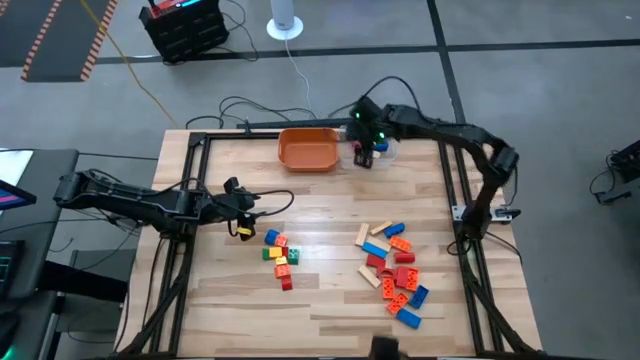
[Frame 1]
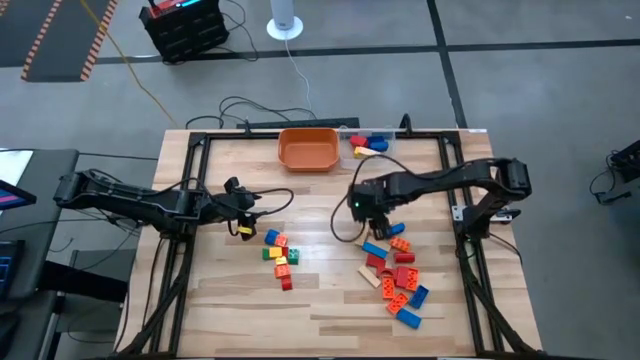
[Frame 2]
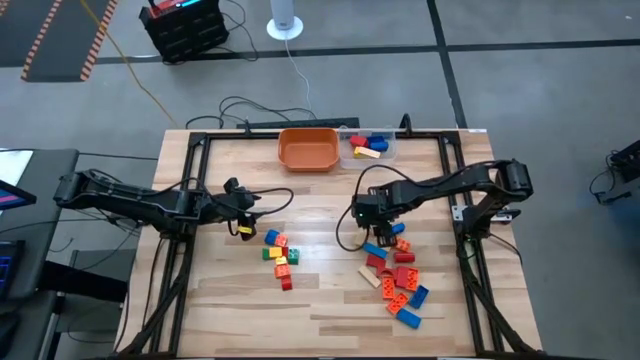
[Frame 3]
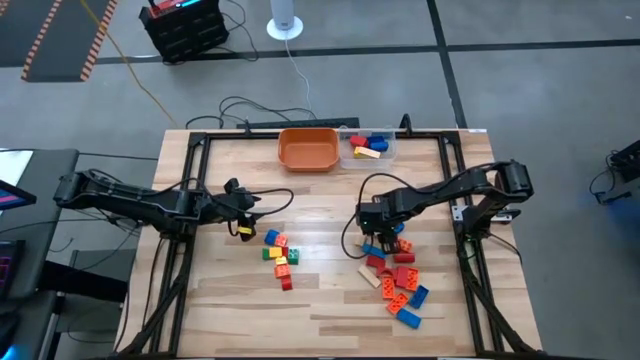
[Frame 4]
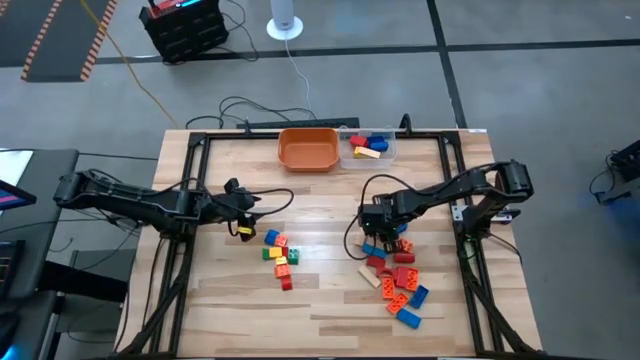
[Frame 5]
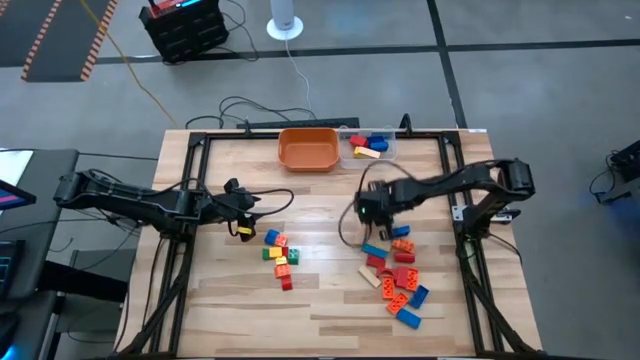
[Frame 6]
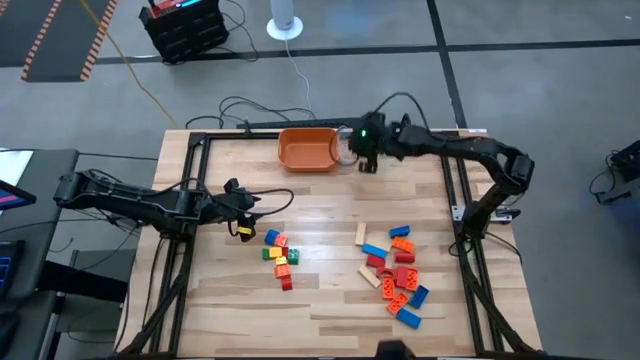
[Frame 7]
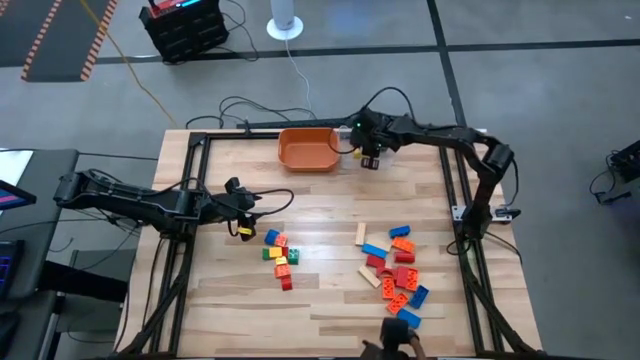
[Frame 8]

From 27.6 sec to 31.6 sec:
Task: Sort blocks by size
Put the middle right wooden block into the transparent bin

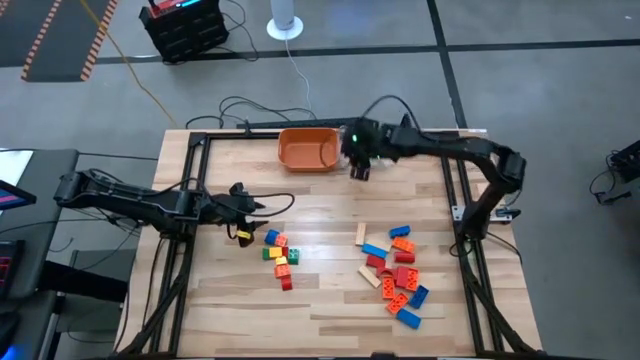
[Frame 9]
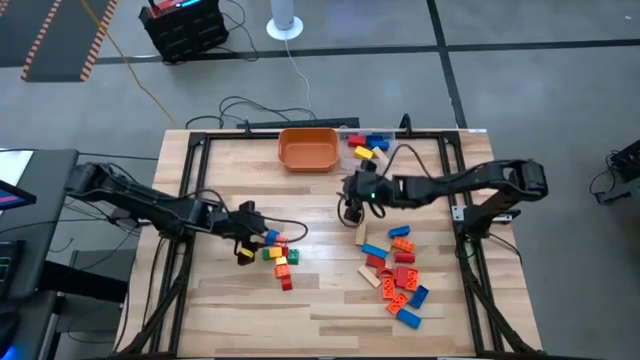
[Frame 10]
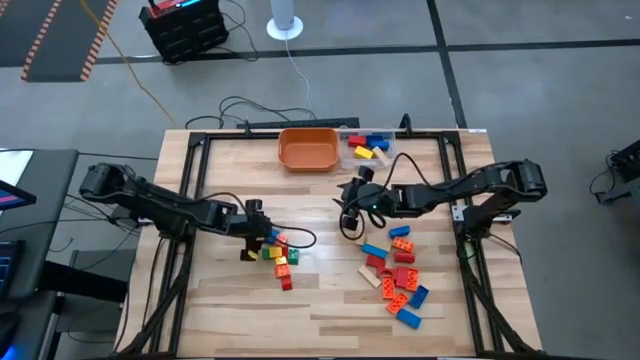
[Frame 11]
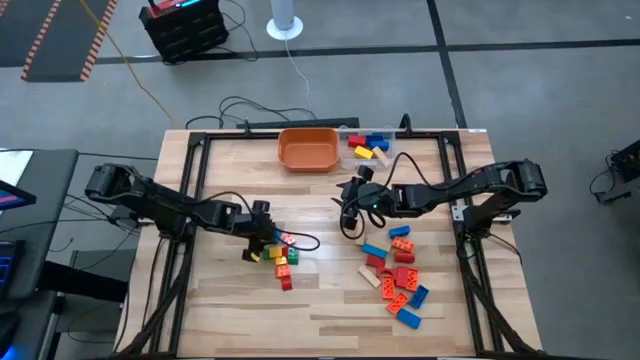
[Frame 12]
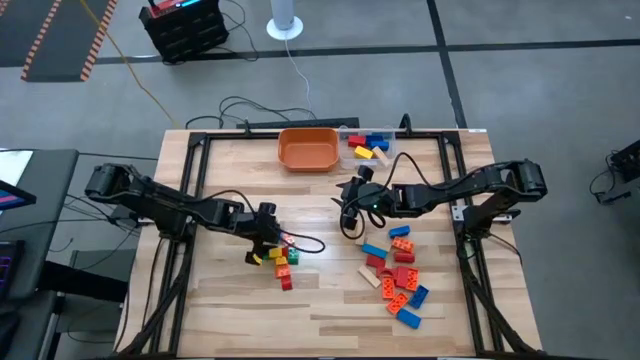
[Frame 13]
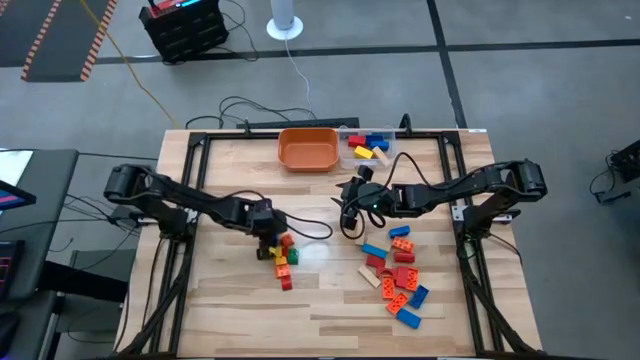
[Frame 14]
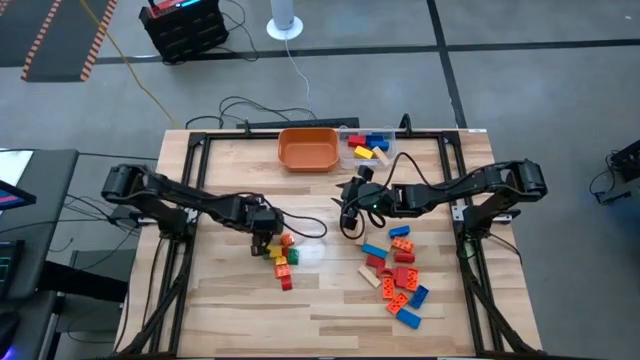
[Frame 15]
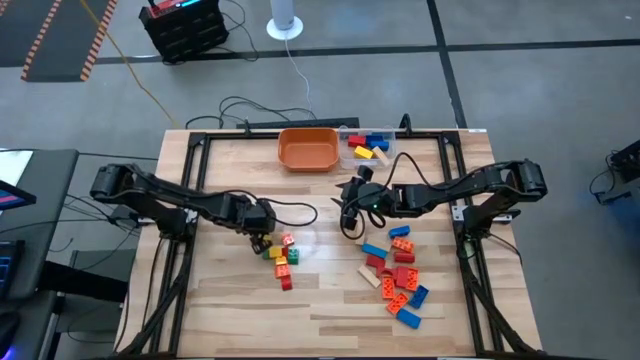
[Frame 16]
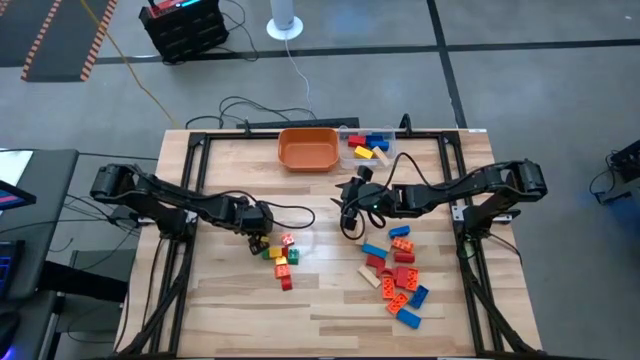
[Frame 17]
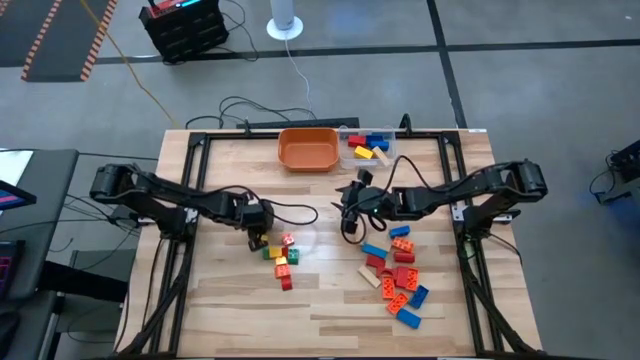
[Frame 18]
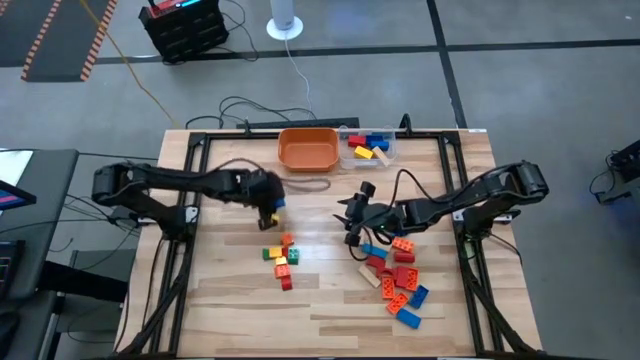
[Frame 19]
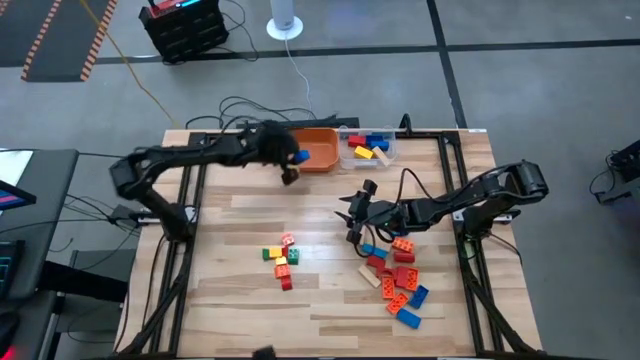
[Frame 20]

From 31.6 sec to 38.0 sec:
Put the blue small game piece into the orange bin

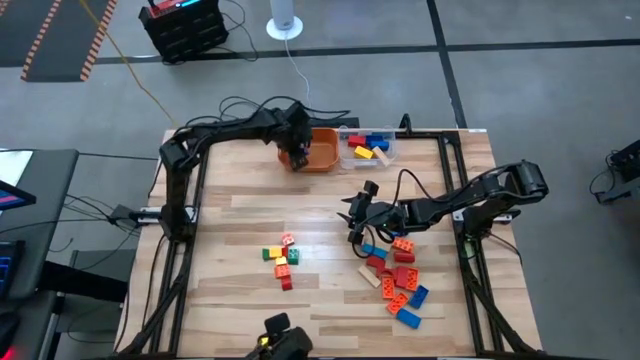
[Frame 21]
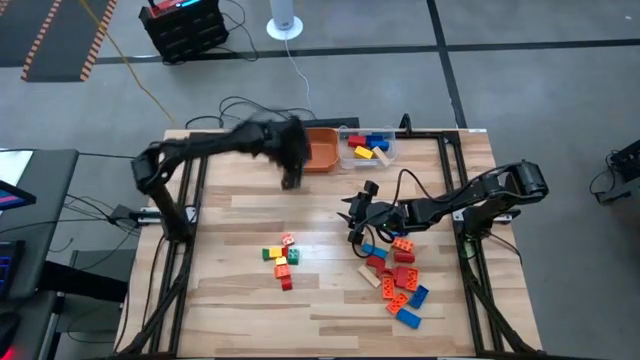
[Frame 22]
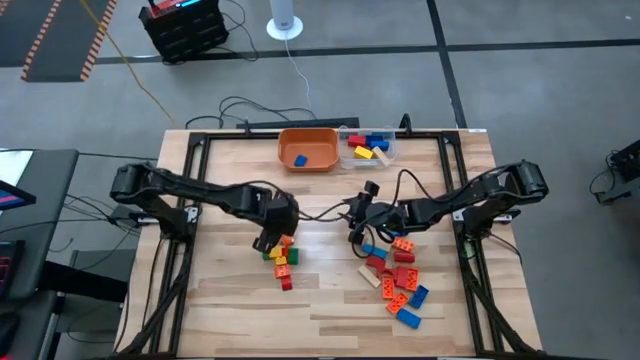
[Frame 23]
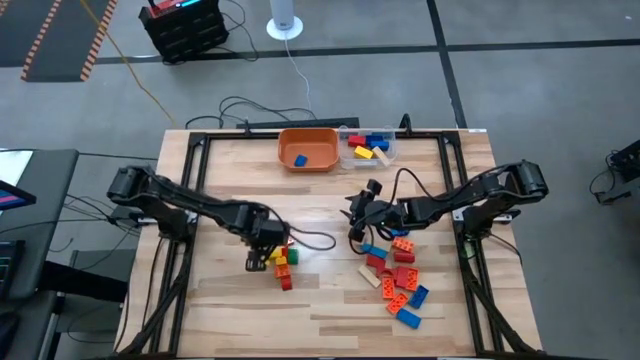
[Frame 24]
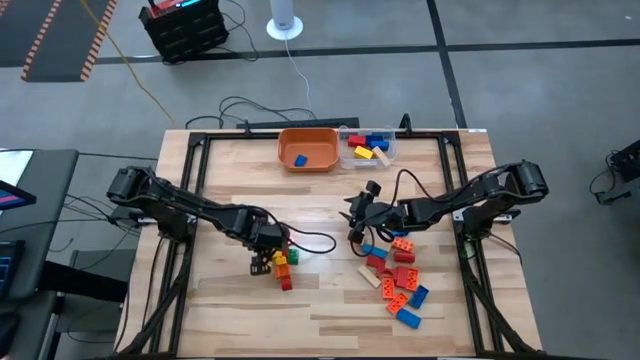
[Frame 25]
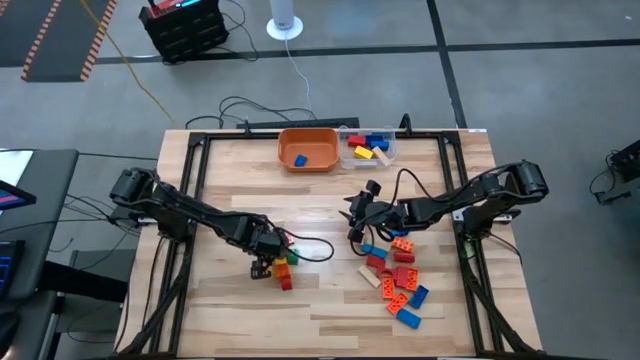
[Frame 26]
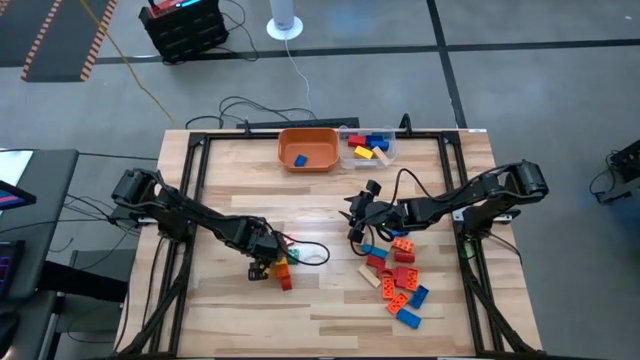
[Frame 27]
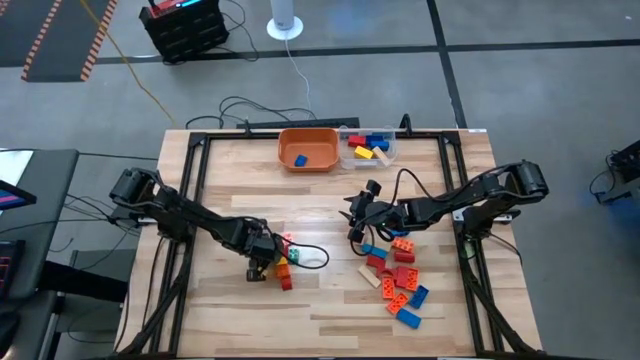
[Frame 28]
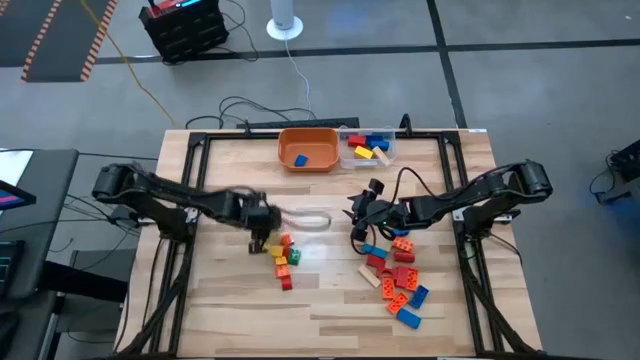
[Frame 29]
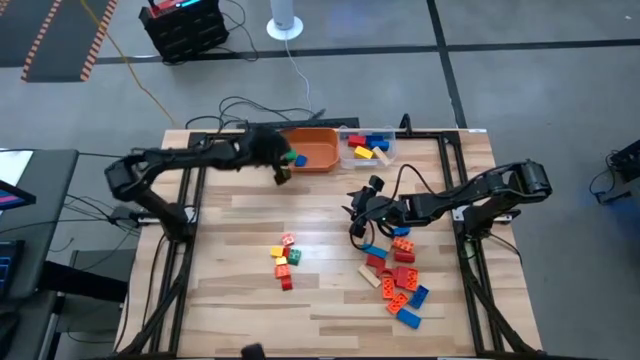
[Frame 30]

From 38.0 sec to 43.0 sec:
Put the right green small game piece into the orange bin

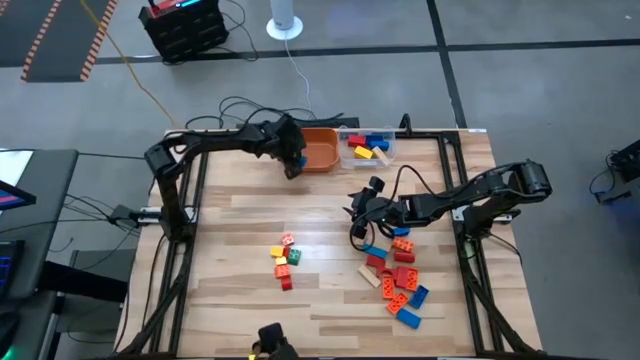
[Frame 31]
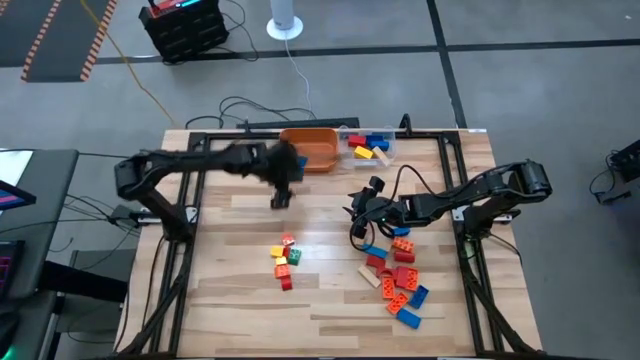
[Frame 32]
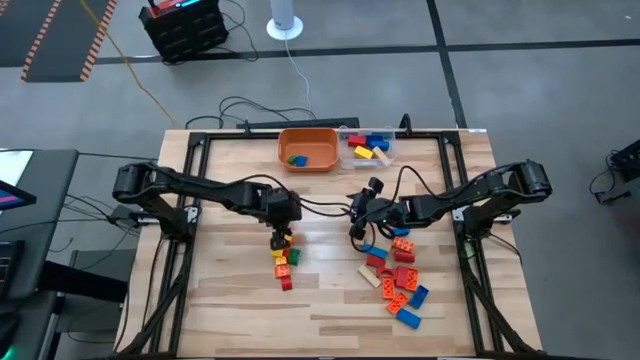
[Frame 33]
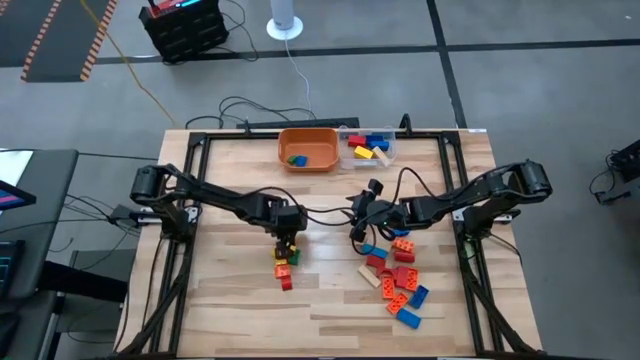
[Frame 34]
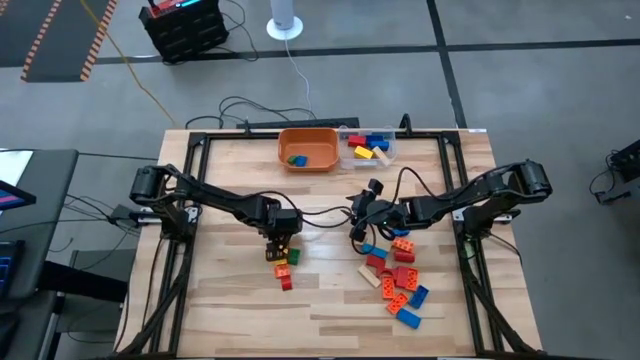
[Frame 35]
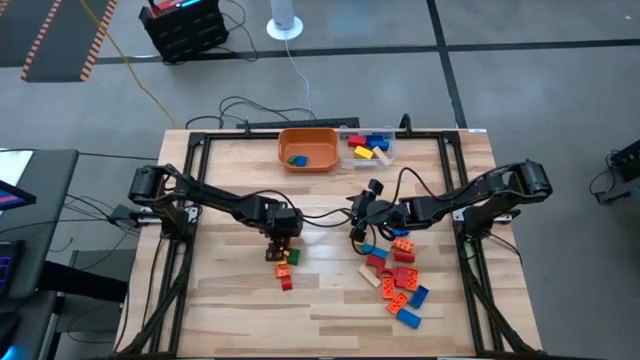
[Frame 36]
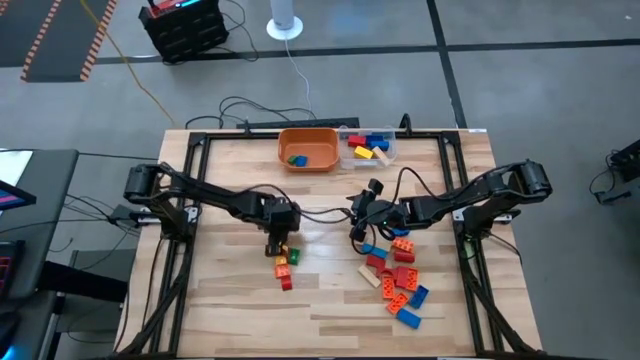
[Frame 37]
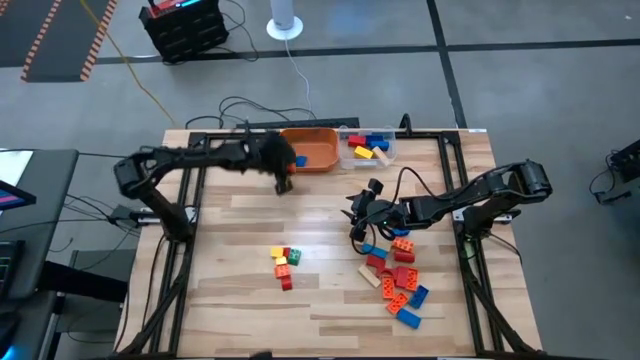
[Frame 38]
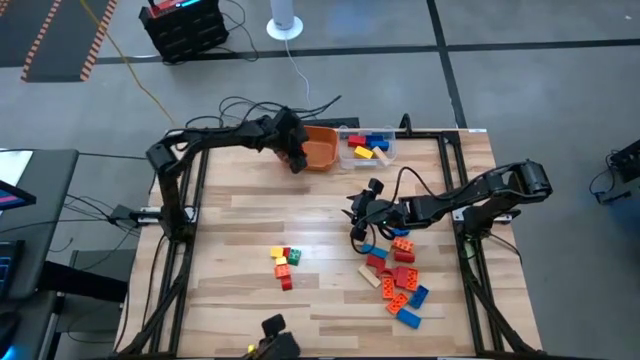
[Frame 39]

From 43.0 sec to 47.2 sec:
Put the top orange small game piece into the orange bin

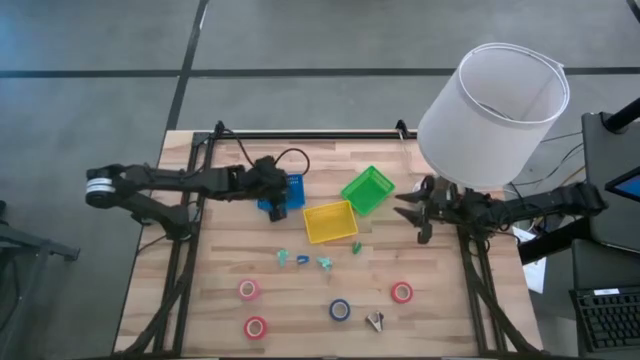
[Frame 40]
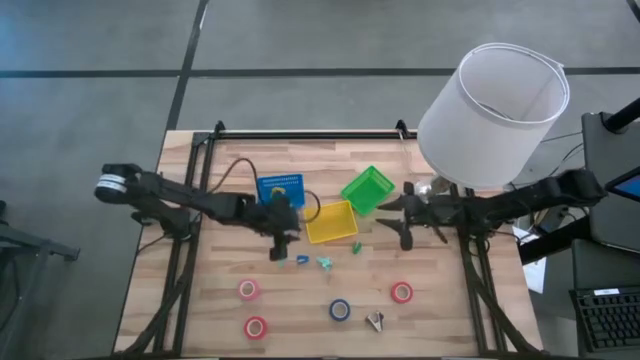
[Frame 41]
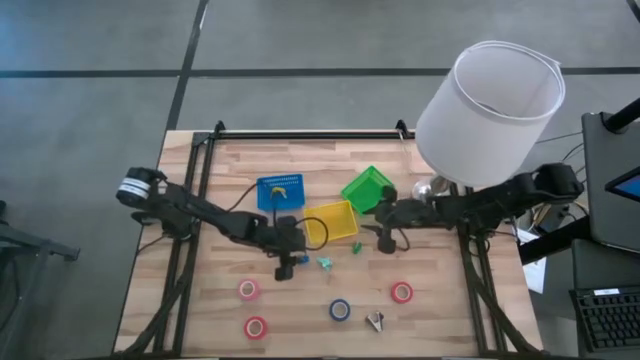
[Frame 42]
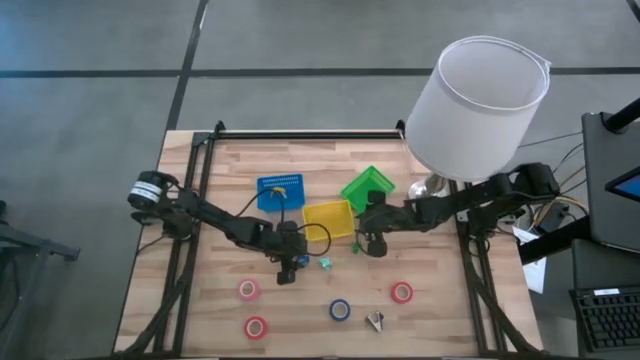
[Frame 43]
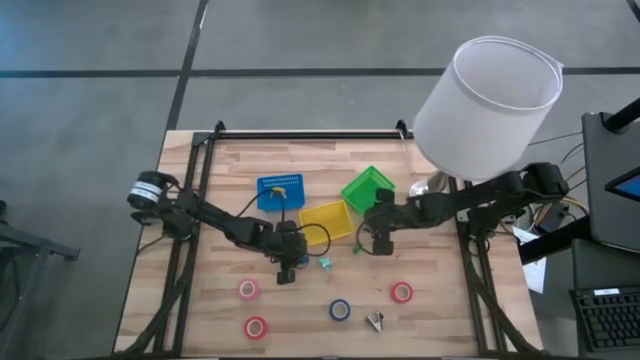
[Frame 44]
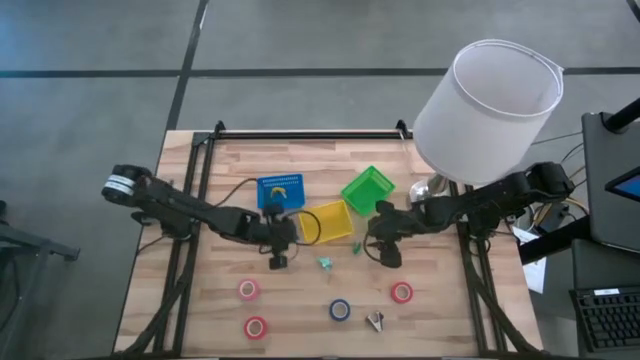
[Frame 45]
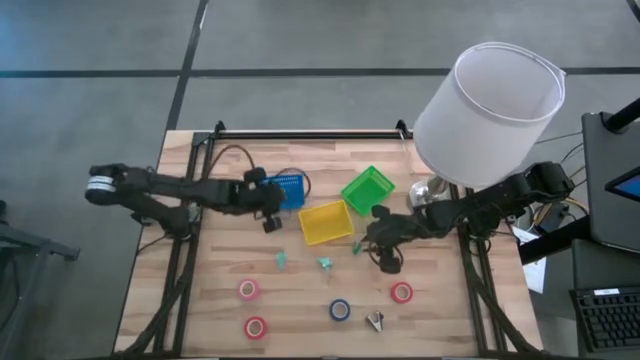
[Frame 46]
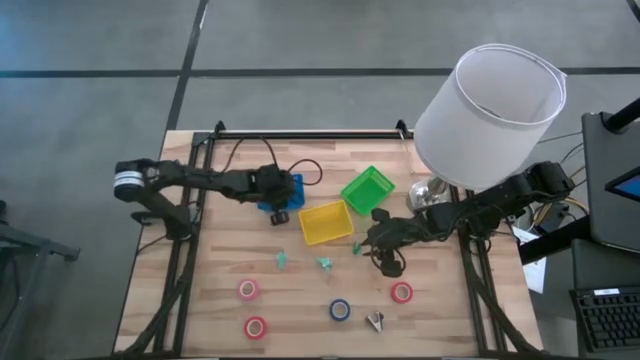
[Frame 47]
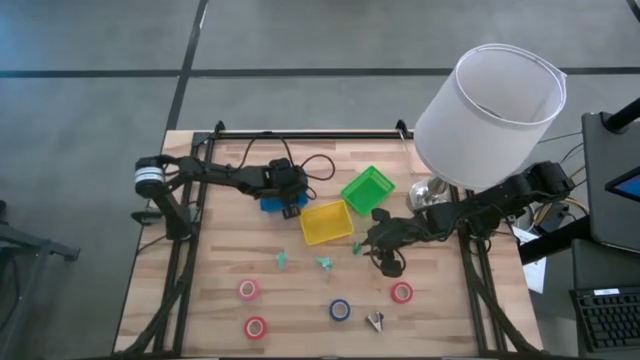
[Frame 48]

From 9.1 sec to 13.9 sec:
Task: Pick and place Stapler, Stapler remover, tape
Put the blue stapler into the blue bin
